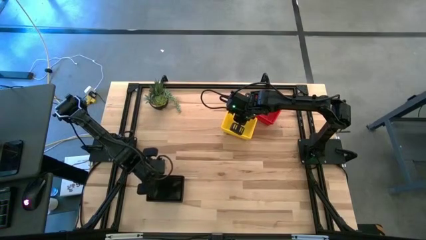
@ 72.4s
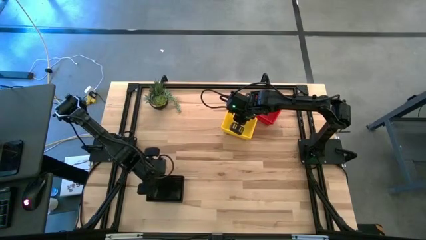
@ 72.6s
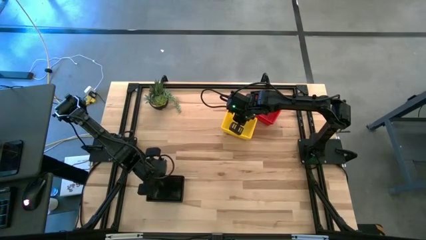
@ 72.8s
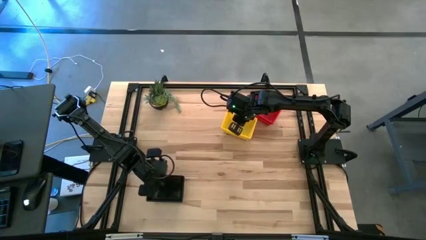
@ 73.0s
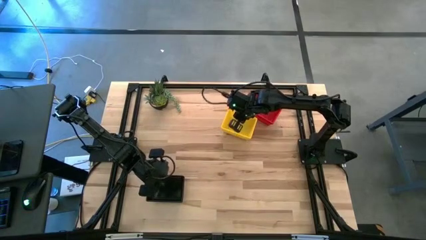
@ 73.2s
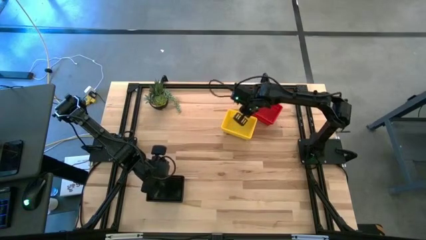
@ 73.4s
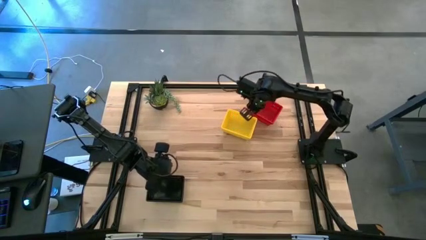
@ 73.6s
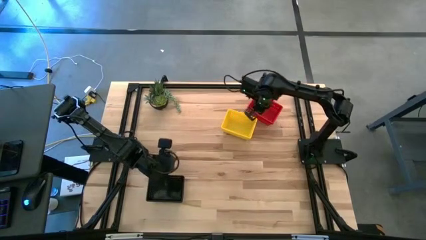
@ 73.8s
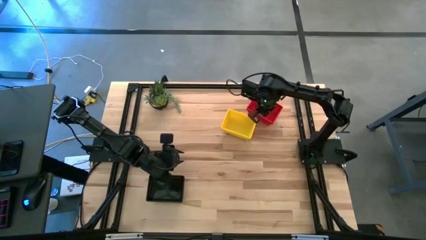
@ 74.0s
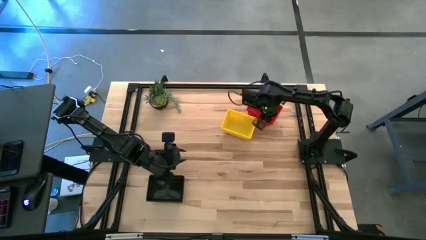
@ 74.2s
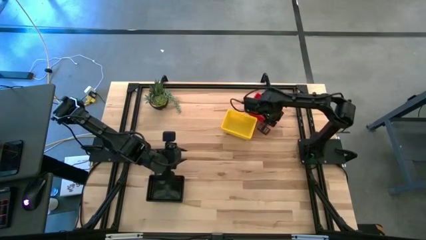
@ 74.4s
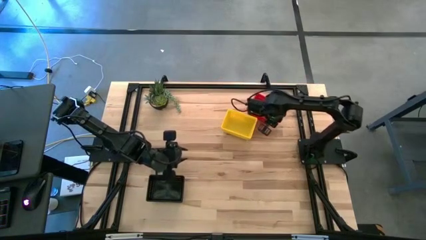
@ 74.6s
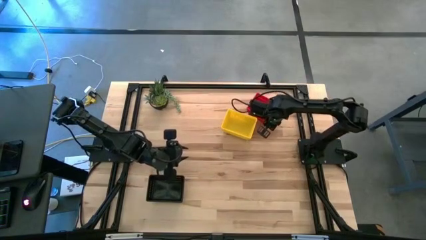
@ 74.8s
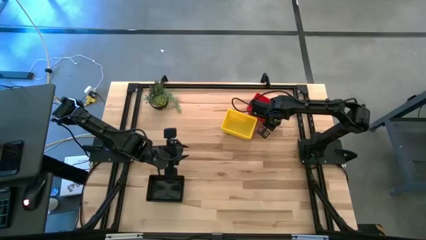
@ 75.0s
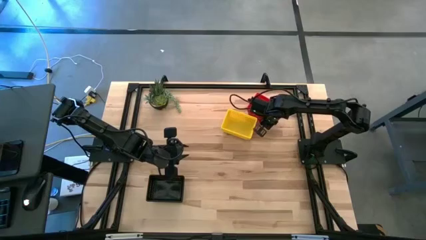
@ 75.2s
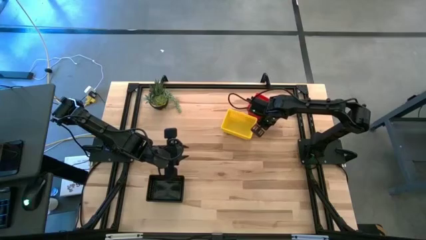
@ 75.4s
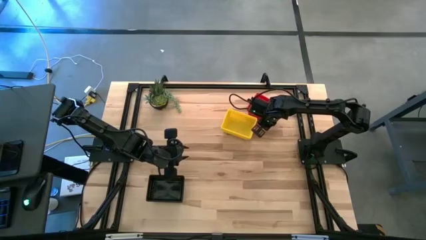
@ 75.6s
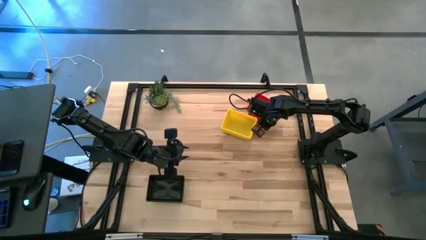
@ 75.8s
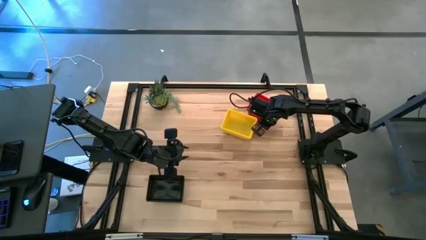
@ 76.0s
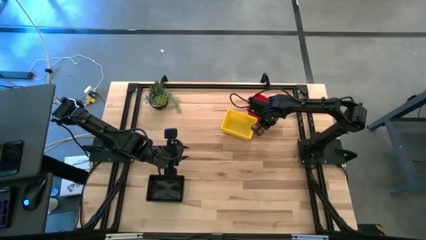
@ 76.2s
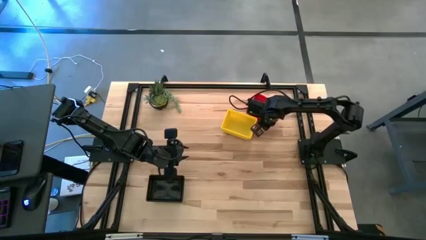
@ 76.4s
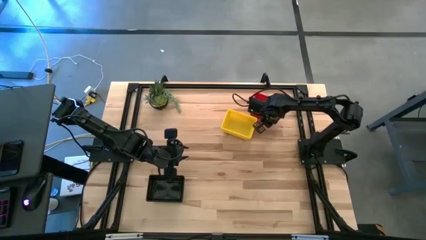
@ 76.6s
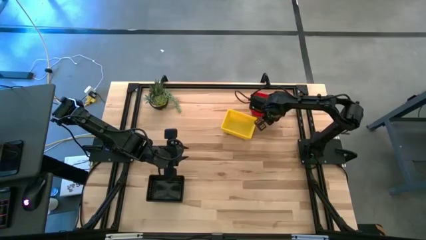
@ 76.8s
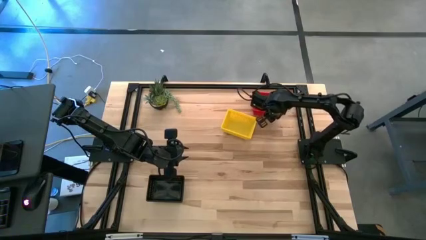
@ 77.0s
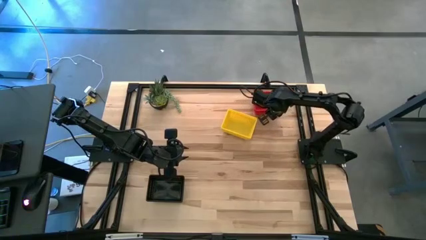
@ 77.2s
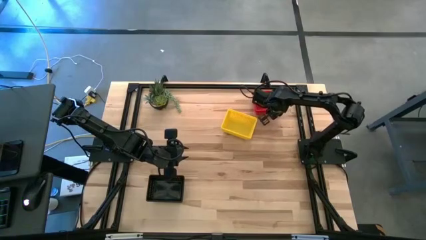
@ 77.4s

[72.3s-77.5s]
Adjust the stacked red bins on the table

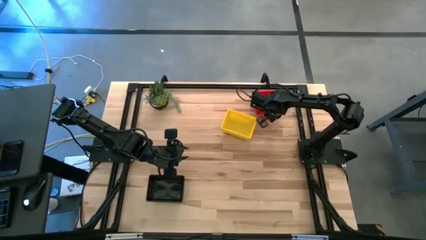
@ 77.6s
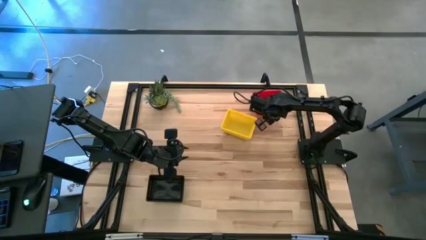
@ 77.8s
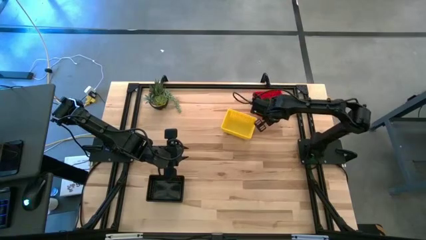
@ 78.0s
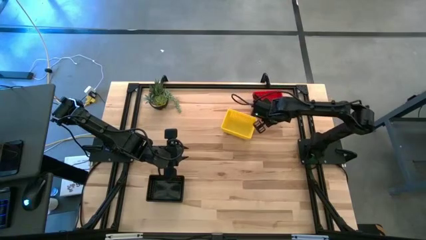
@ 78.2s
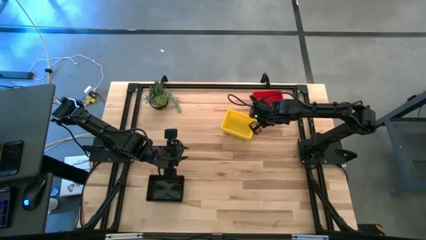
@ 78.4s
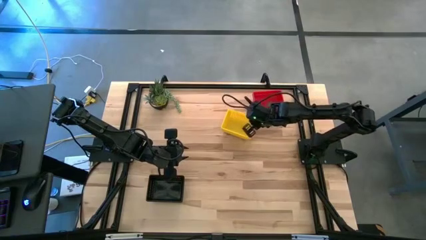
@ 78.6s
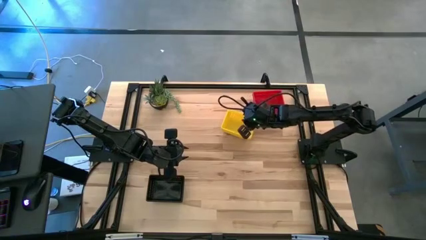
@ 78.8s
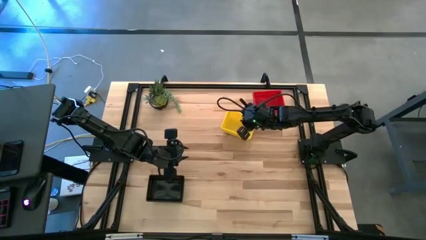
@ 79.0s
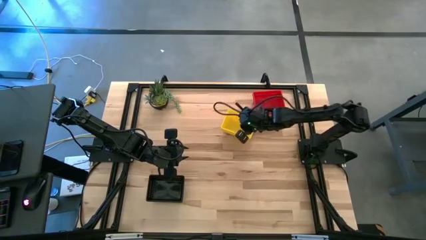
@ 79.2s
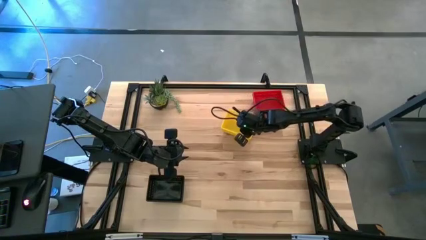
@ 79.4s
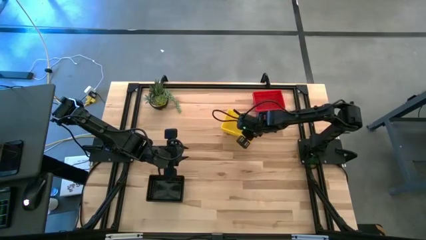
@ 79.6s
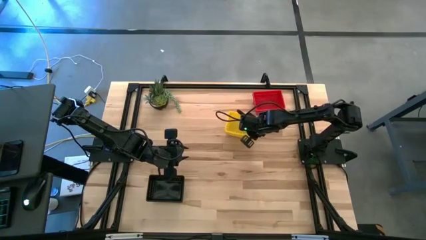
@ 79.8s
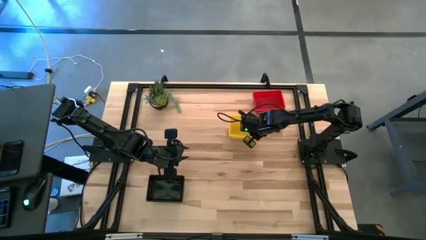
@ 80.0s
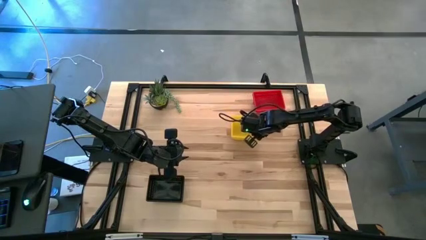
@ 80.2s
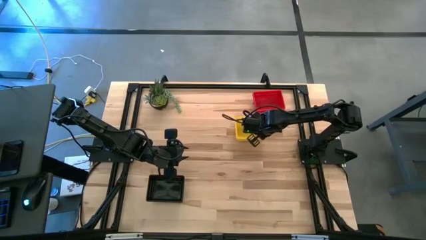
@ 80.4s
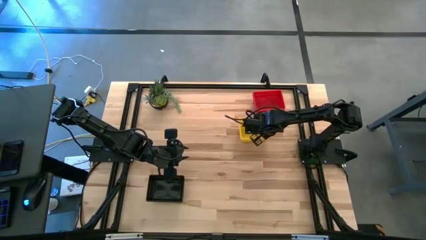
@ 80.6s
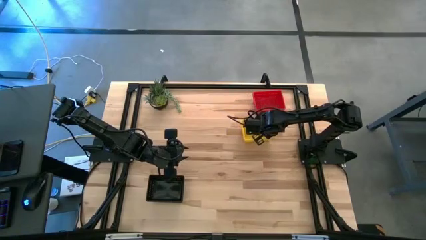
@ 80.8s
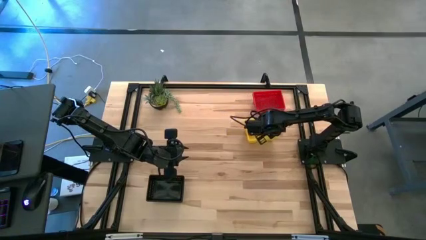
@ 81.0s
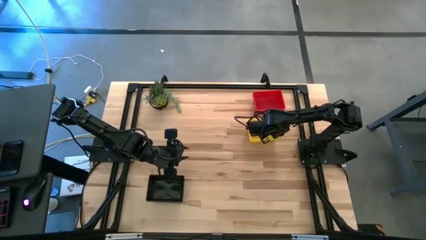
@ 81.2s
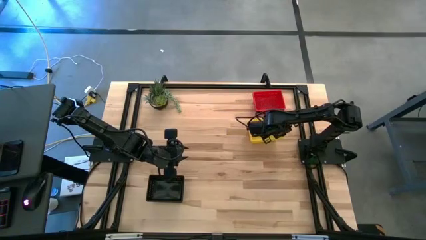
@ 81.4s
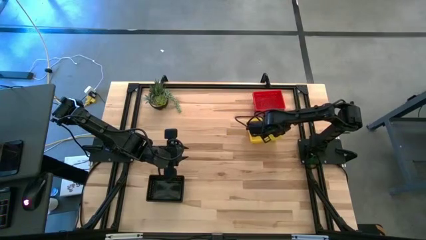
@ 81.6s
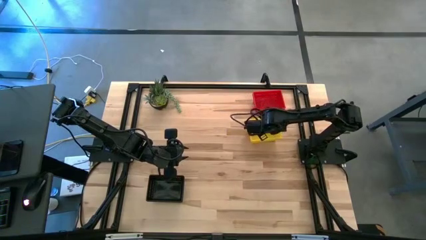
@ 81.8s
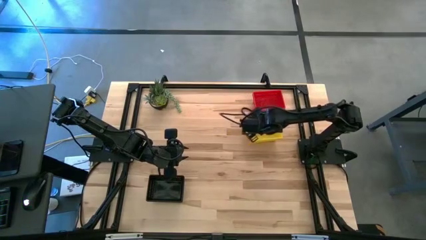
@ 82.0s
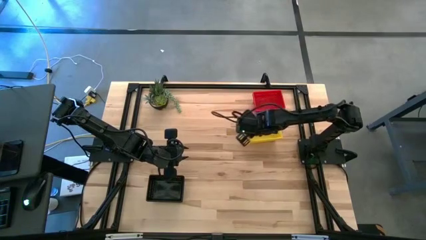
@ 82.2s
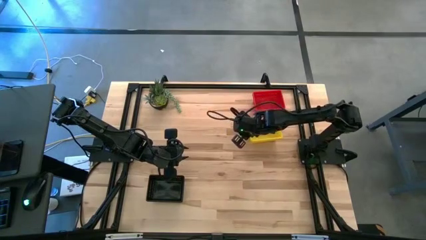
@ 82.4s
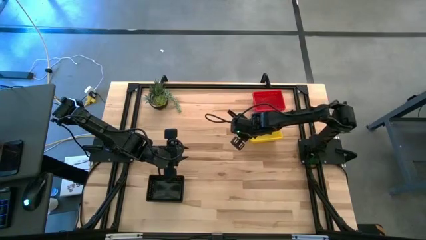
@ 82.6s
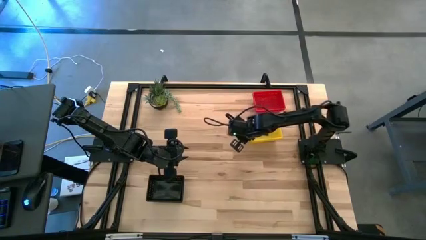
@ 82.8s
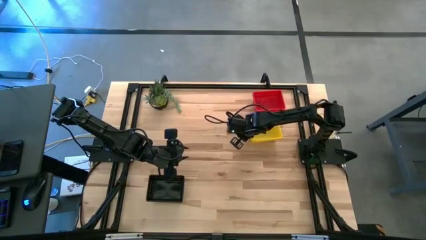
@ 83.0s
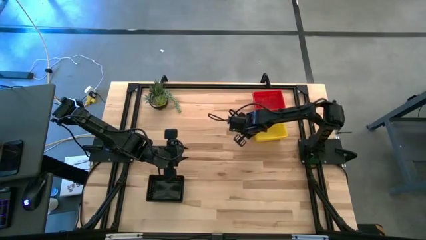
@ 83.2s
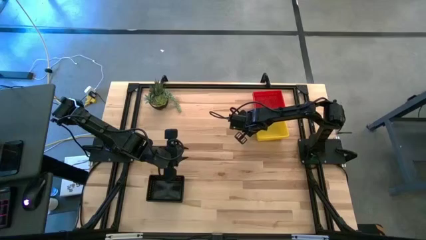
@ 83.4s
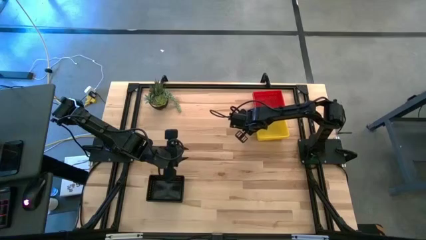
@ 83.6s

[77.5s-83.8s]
Move the stacked yellow bins below the stacked red bins

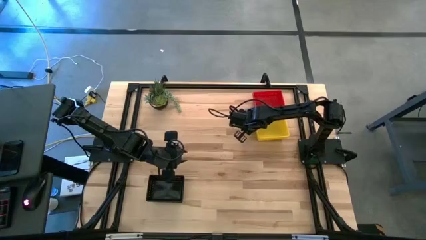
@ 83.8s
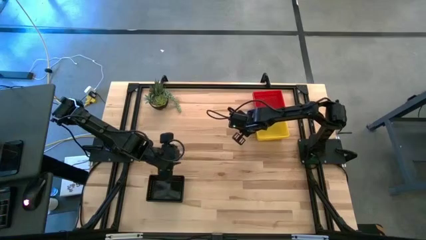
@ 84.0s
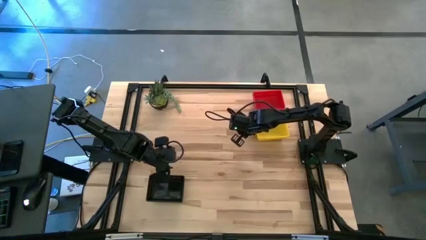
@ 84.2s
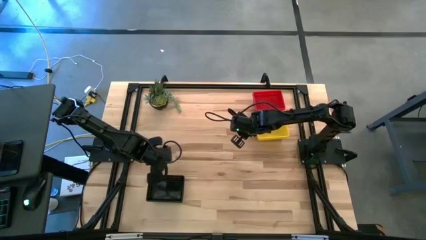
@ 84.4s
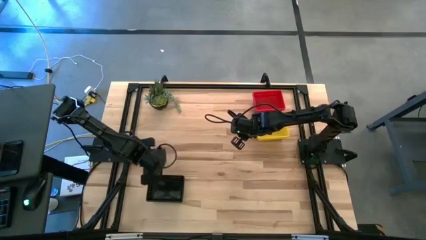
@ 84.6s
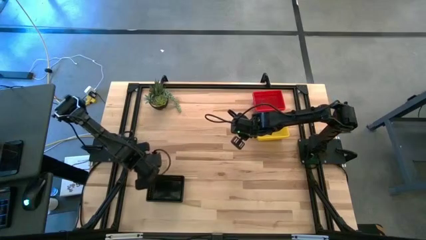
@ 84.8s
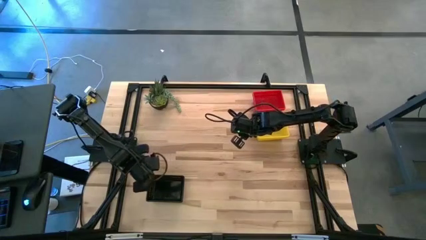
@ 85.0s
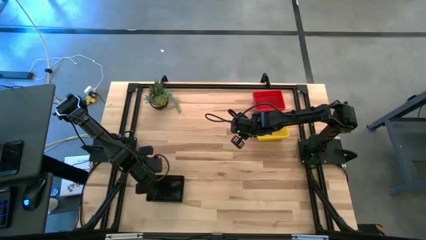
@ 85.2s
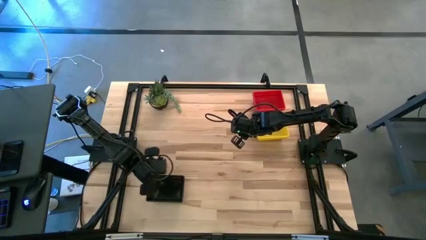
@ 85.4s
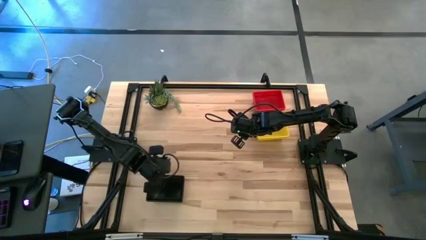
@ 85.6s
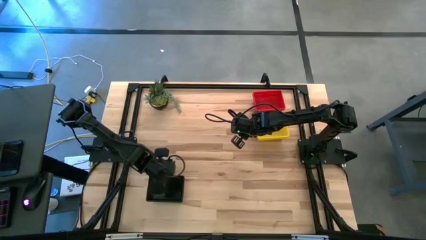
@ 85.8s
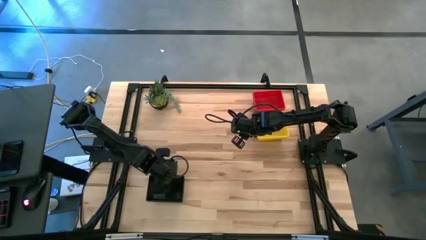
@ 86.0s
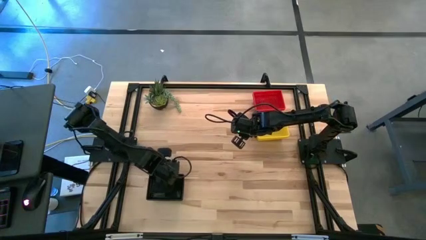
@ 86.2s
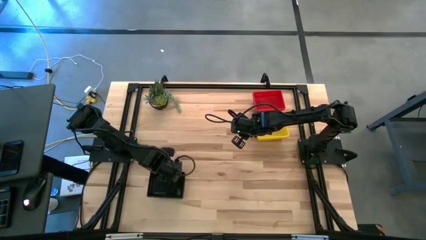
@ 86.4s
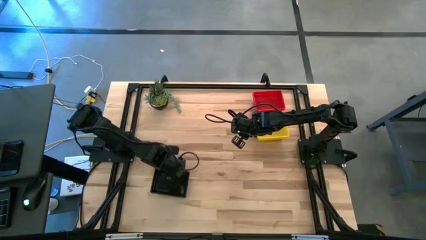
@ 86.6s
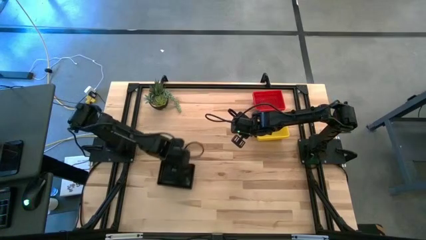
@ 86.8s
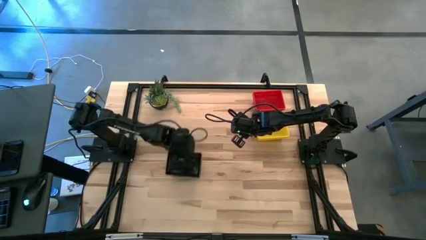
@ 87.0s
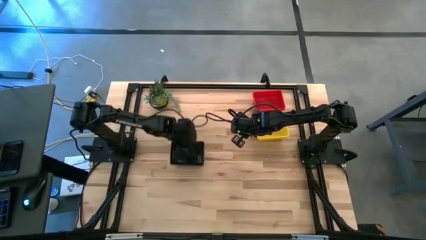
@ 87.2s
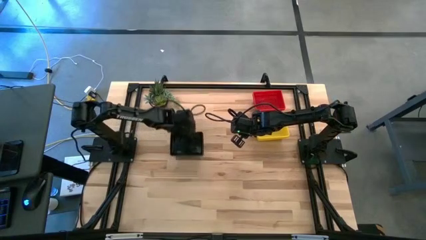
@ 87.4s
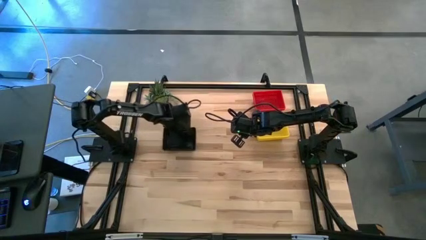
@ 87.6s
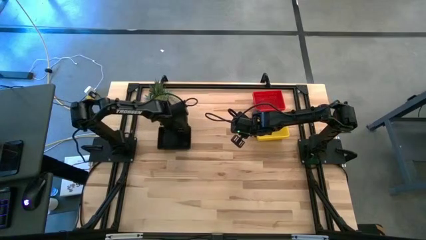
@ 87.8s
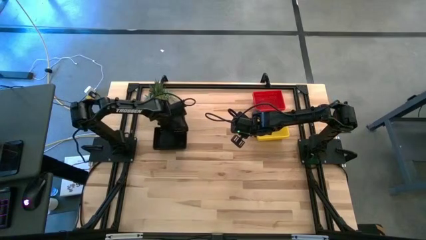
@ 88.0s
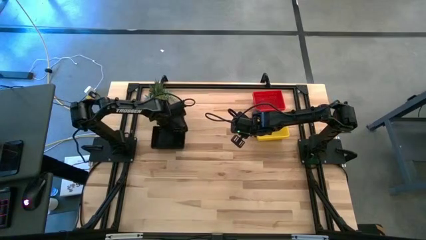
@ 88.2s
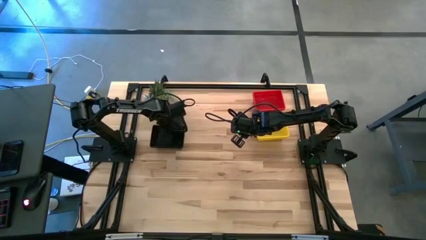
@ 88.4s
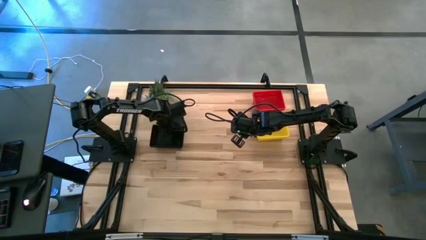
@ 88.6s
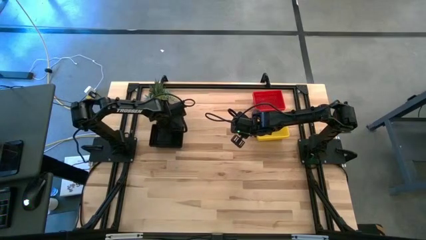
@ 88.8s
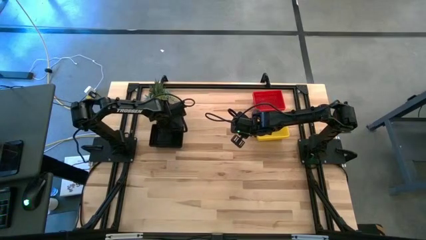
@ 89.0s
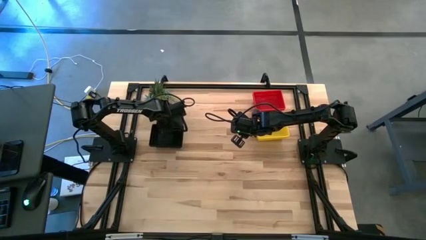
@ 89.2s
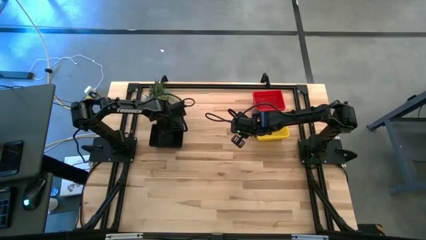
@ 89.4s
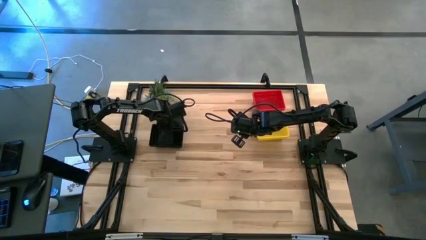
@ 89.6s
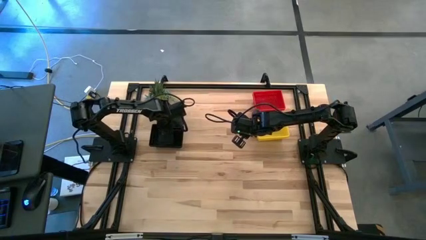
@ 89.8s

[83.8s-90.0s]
Move the stacked black bins to the top left of the table
